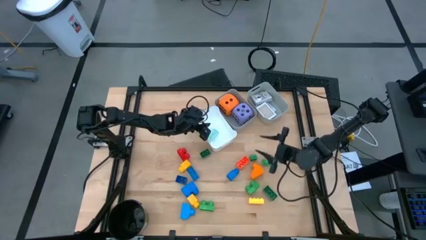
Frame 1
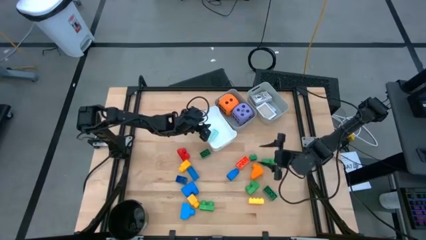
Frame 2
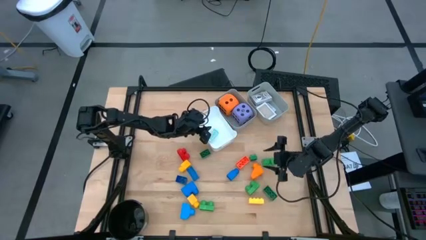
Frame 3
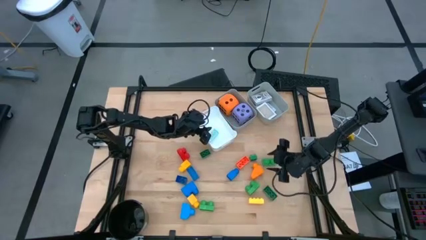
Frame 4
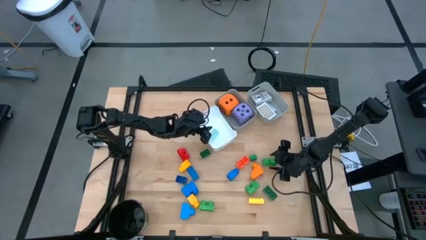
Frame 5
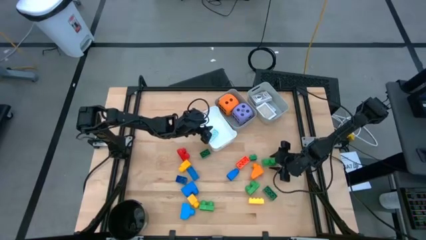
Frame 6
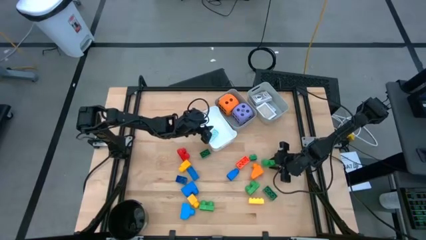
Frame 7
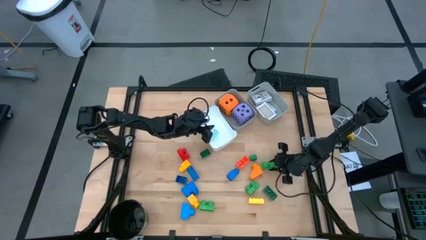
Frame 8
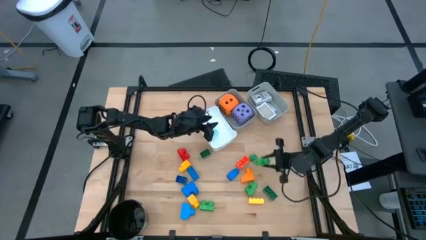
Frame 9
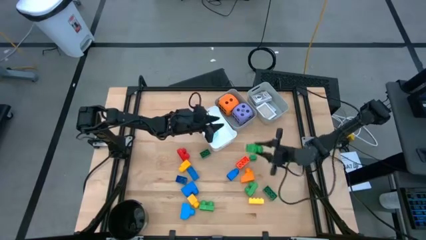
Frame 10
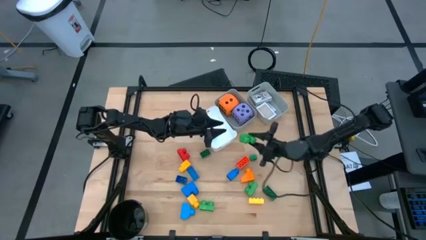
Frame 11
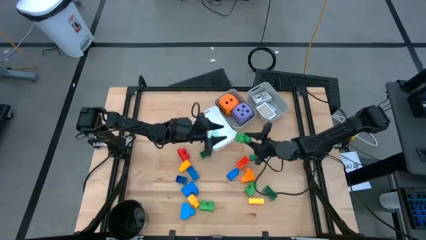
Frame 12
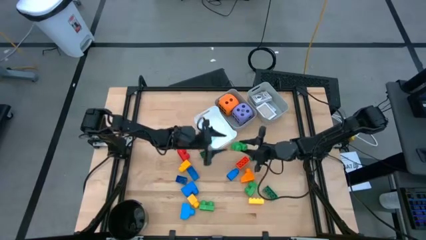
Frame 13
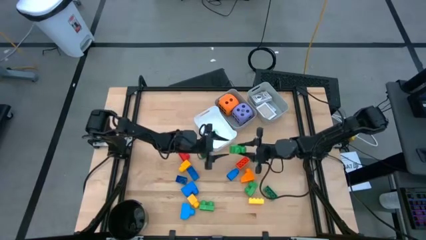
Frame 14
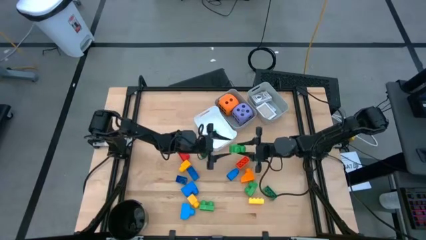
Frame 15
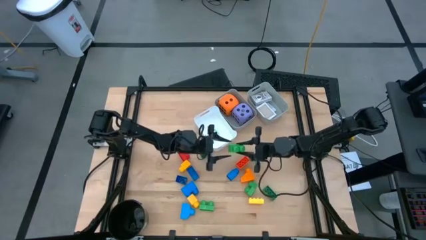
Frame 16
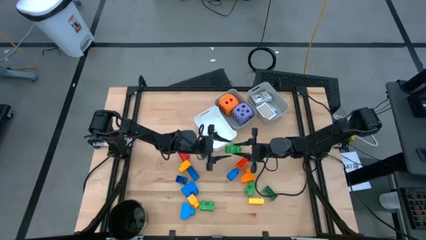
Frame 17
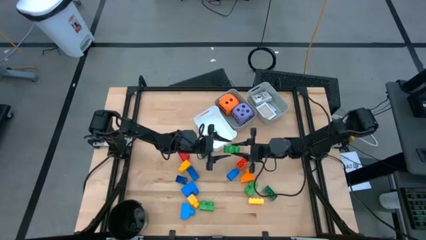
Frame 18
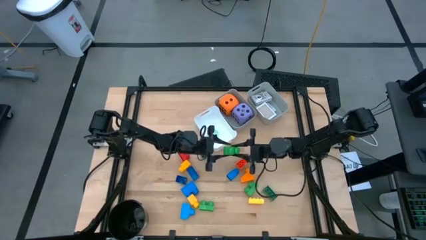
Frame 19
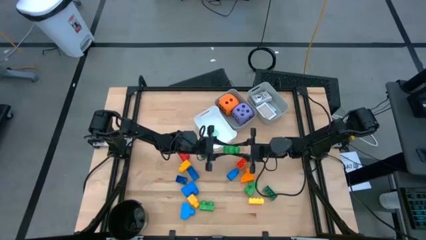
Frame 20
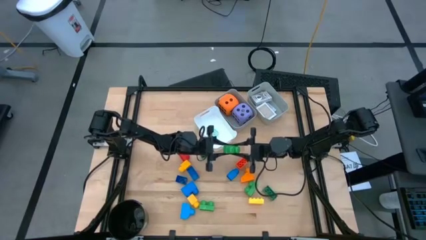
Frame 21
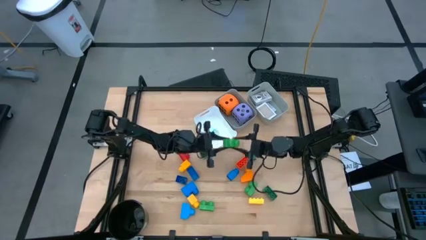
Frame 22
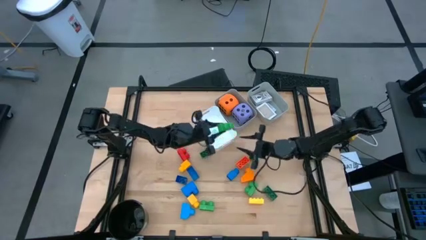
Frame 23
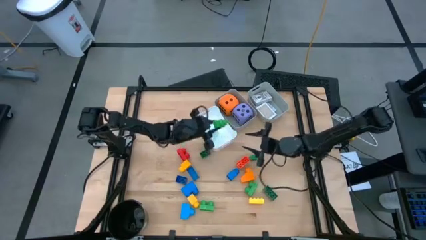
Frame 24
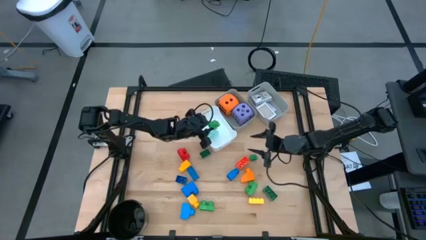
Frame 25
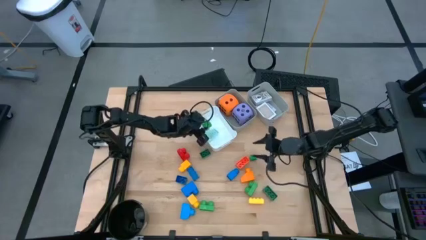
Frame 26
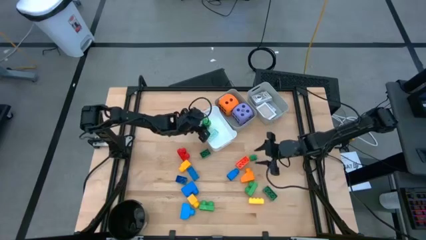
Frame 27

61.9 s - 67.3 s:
Task: Pick & Place Toys
Put the green game piece into the white bin

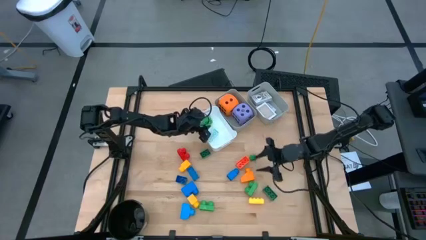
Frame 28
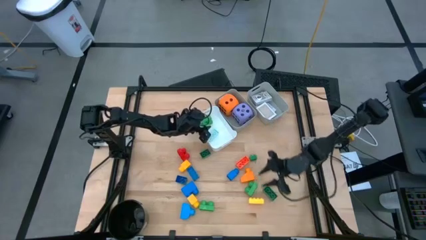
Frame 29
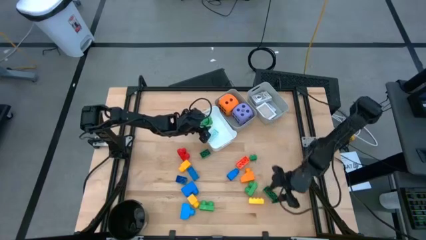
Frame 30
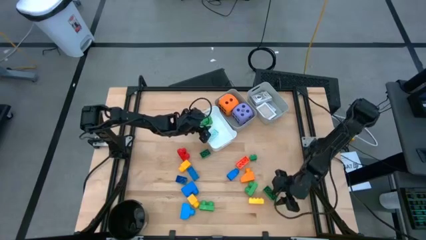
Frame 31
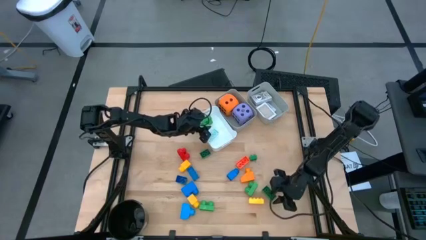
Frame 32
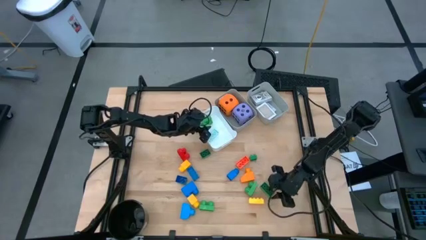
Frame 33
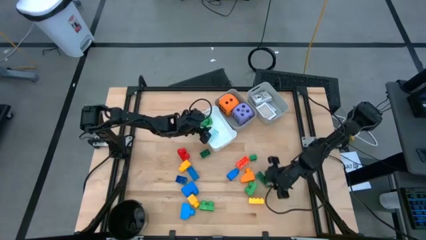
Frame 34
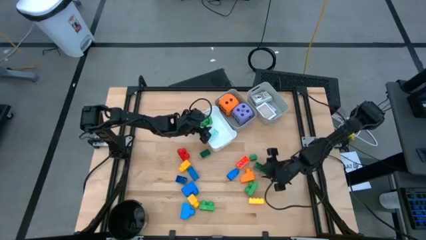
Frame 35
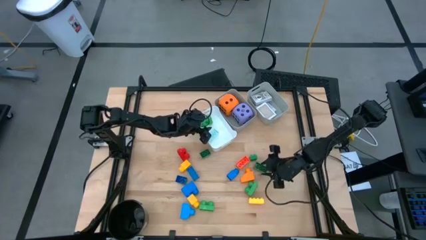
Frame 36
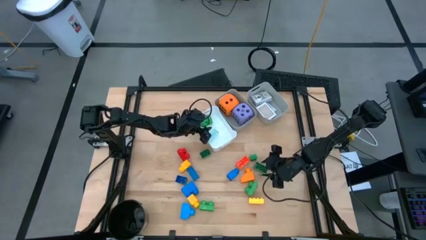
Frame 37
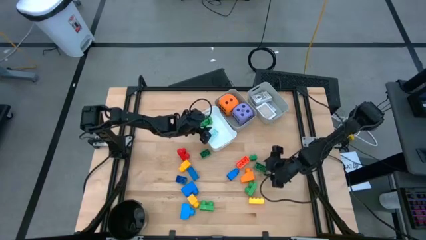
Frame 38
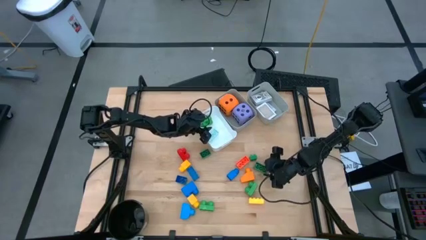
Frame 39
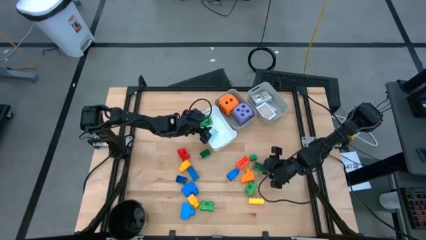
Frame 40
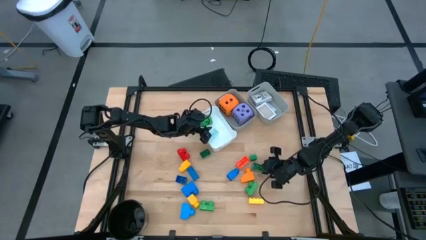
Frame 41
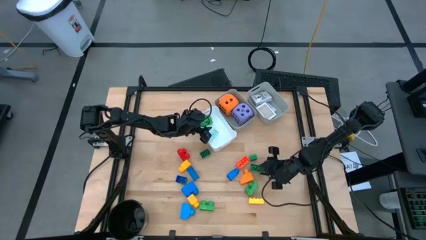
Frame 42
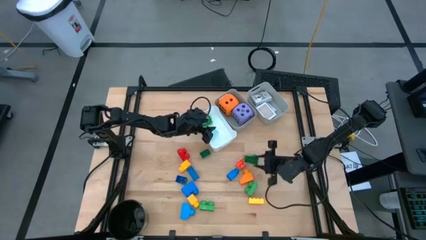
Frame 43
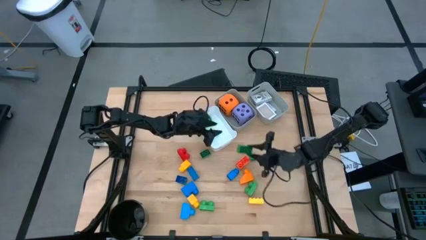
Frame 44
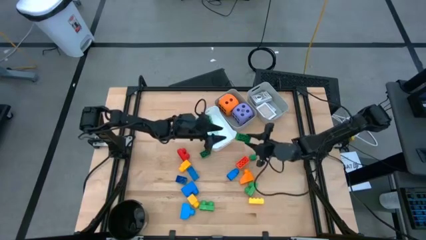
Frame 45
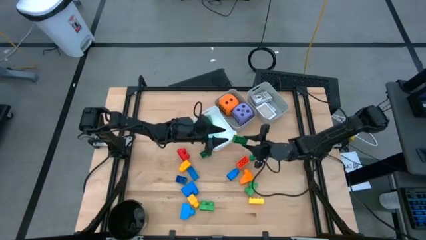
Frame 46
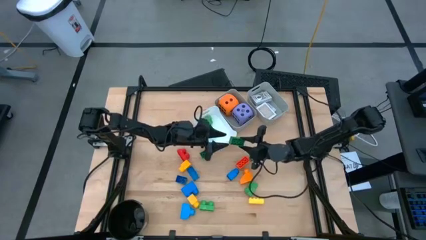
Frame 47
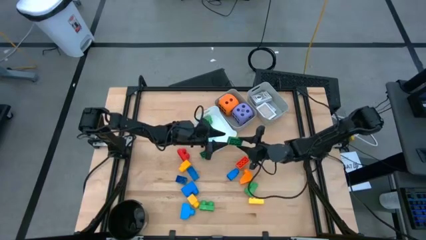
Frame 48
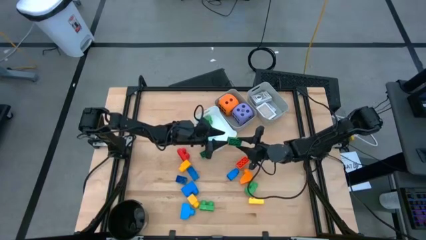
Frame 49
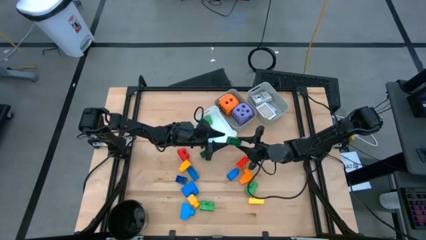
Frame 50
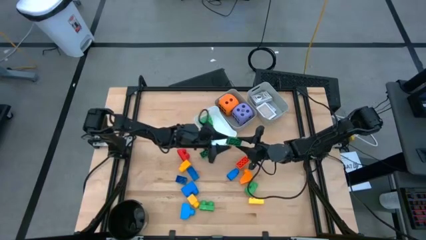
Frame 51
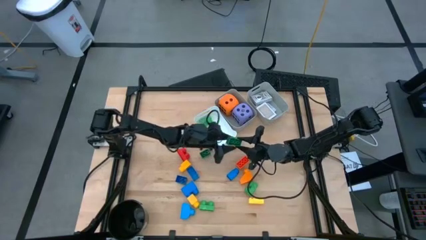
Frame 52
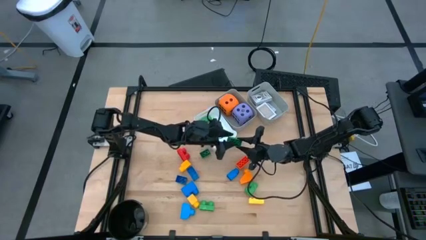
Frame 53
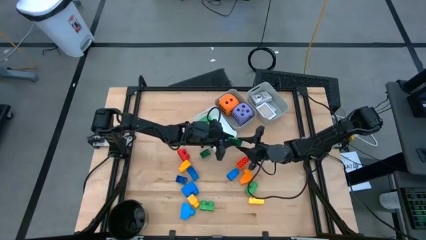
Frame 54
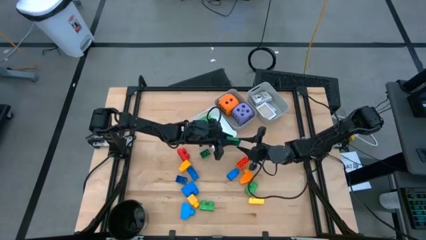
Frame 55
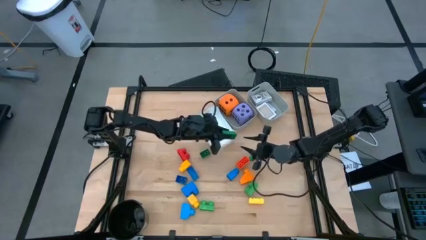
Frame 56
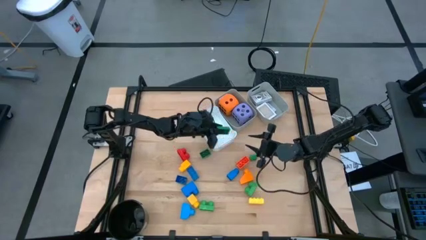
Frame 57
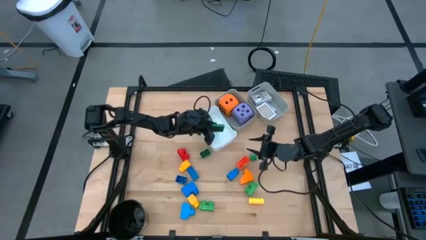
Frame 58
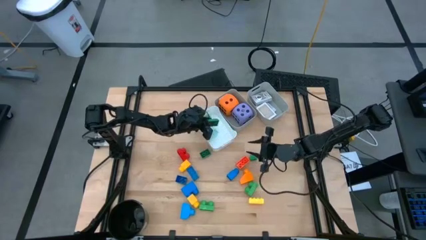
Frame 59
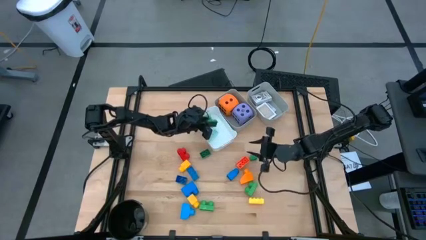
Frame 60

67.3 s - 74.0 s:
Put the green game piece into the white bin

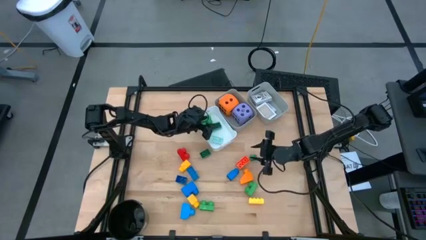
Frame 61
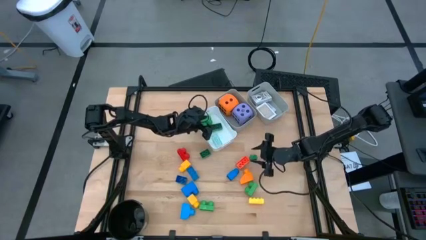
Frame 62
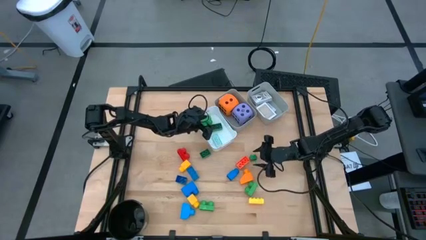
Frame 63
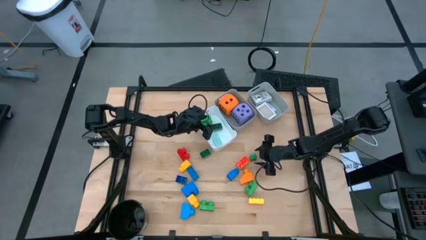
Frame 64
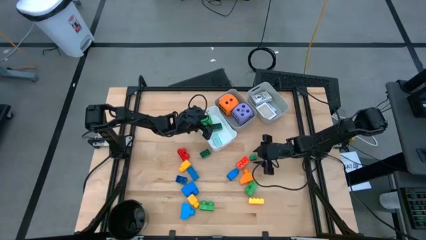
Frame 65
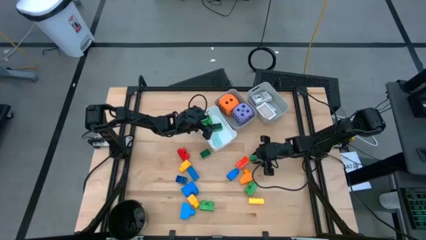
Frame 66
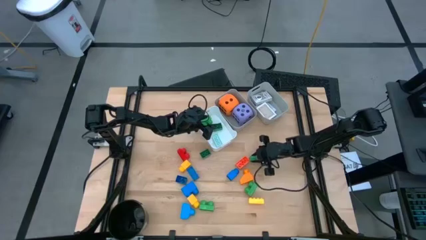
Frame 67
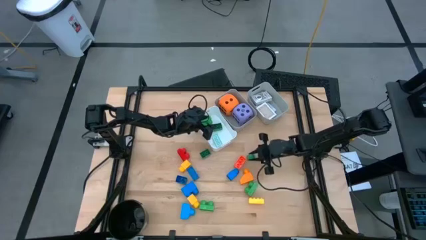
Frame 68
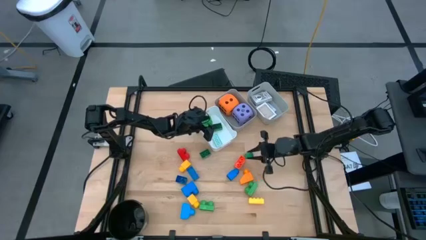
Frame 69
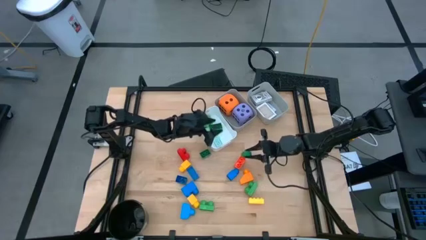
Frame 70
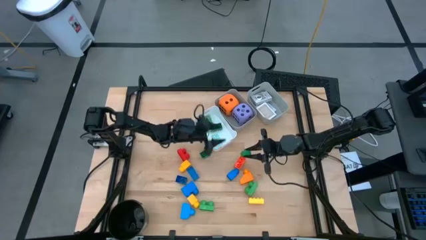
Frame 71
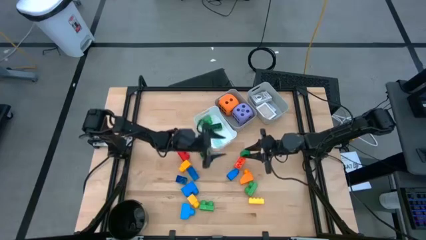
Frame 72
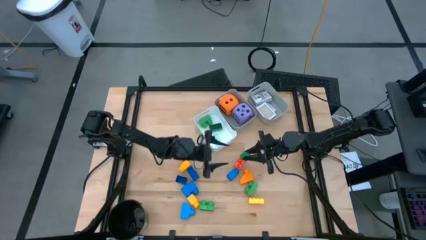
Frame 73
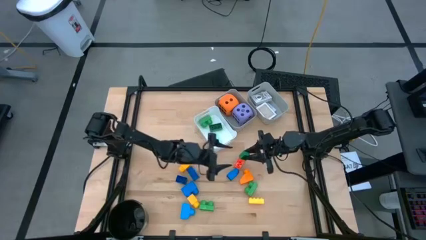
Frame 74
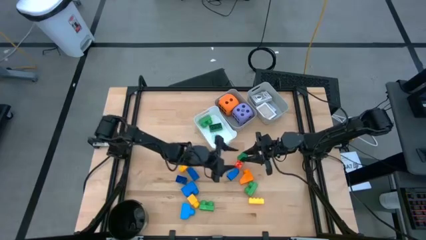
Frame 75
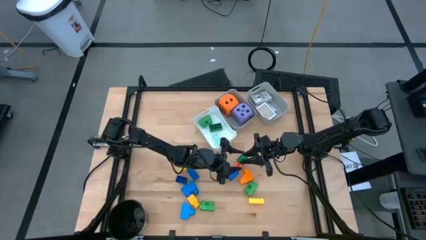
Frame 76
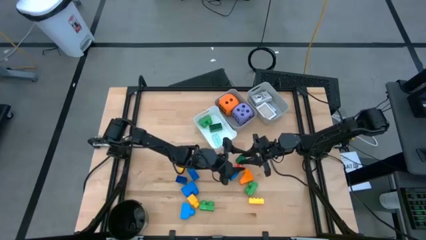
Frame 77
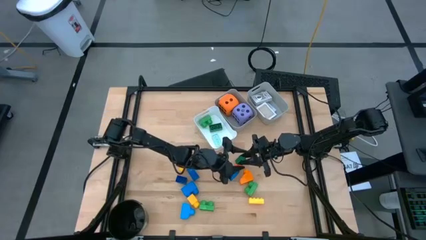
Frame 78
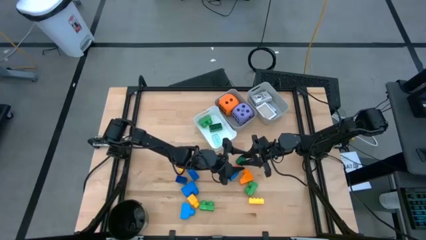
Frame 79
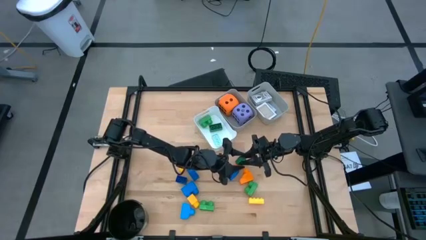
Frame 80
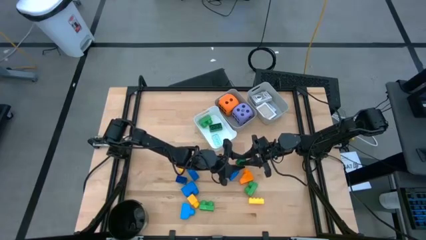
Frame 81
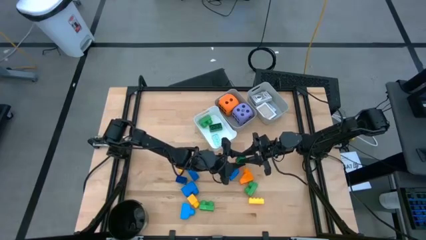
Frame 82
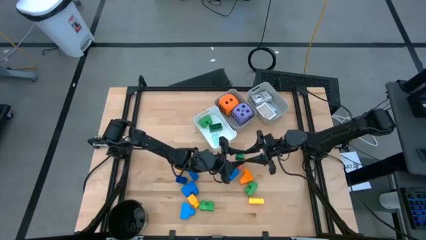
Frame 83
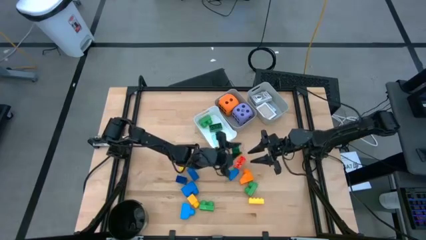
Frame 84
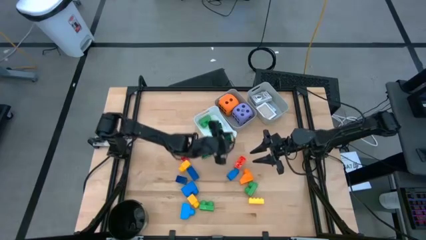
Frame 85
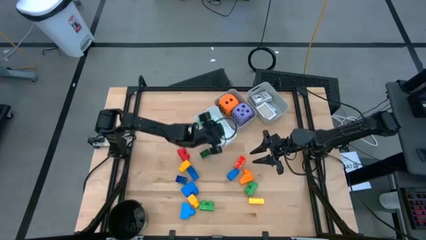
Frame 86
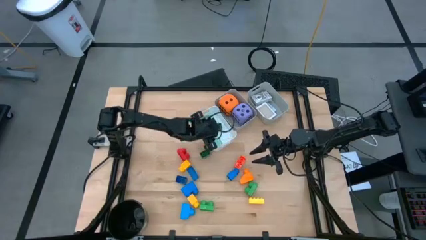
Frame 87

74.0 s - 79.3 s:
Put the green game piece into the white bin
